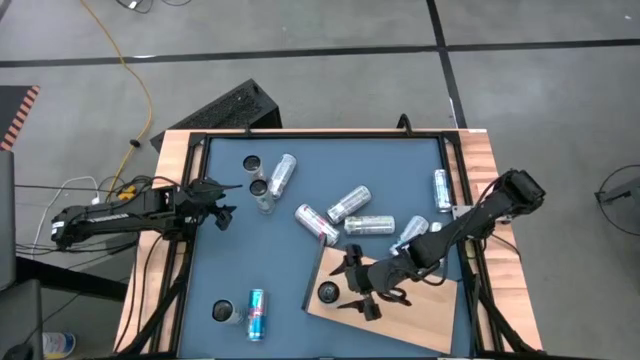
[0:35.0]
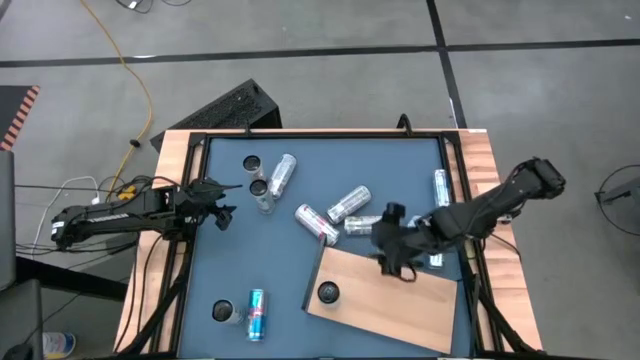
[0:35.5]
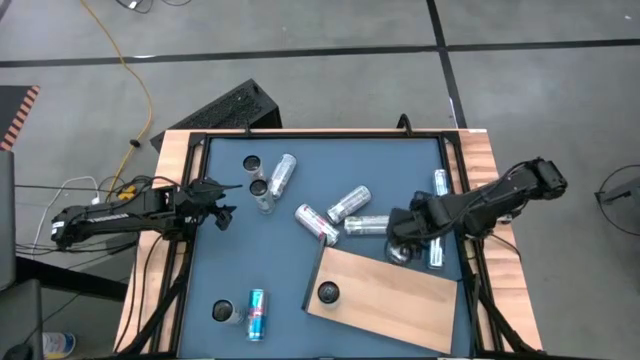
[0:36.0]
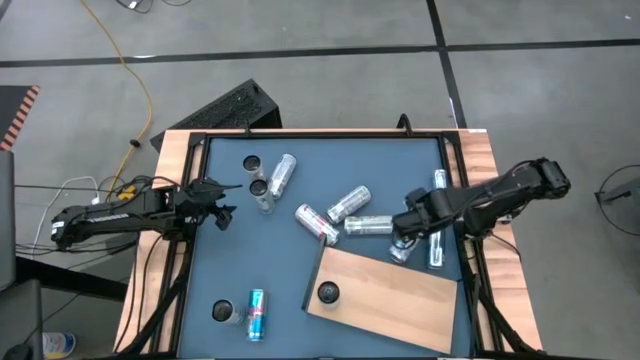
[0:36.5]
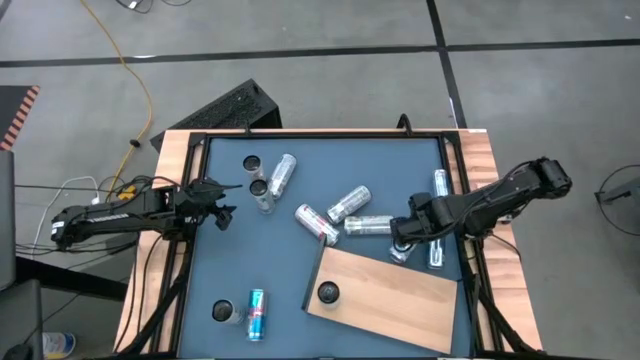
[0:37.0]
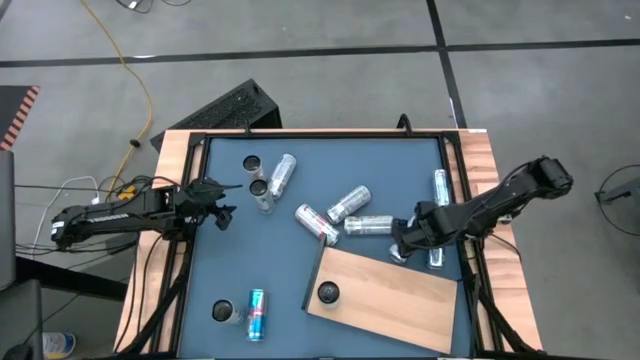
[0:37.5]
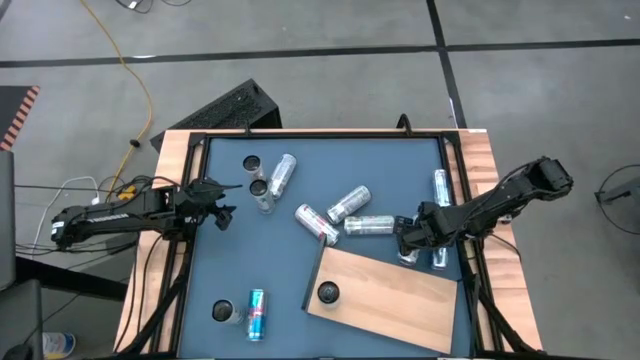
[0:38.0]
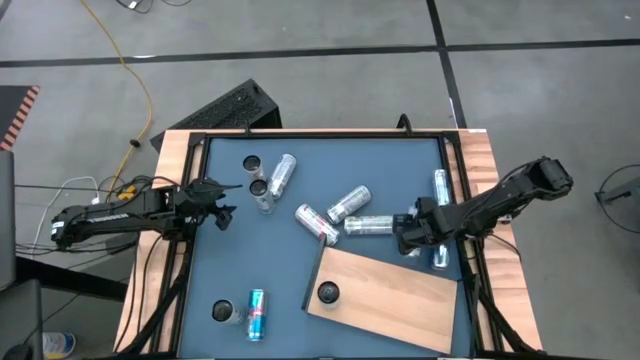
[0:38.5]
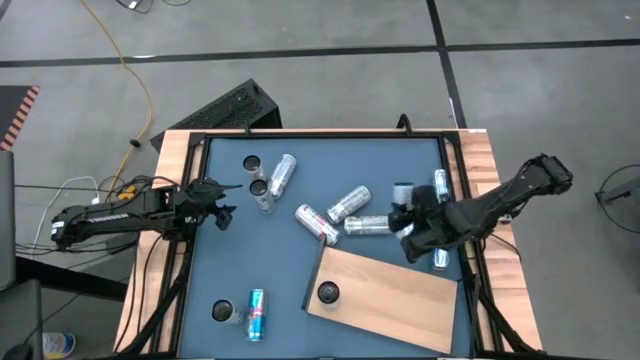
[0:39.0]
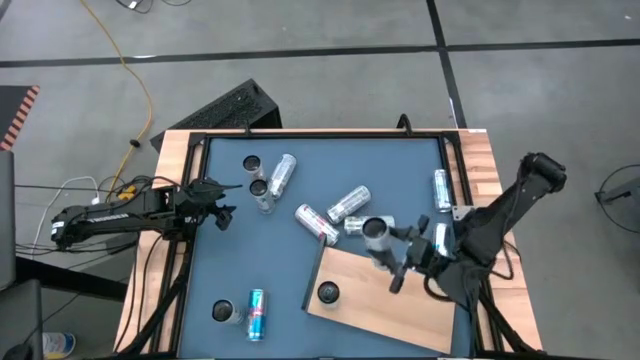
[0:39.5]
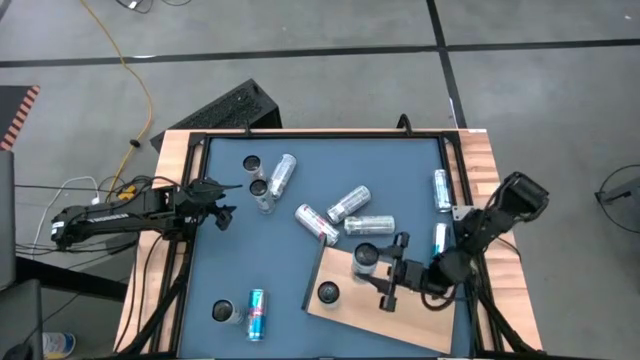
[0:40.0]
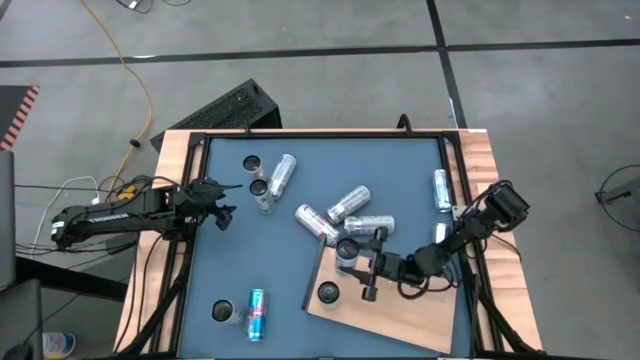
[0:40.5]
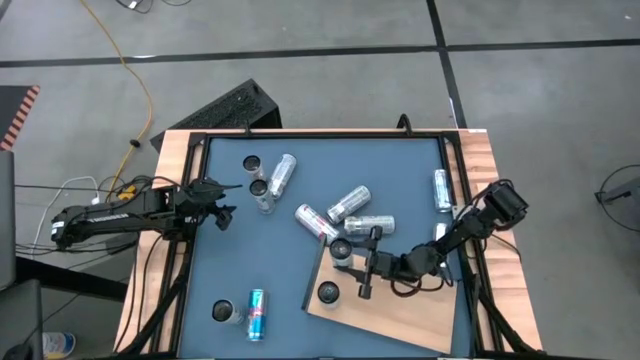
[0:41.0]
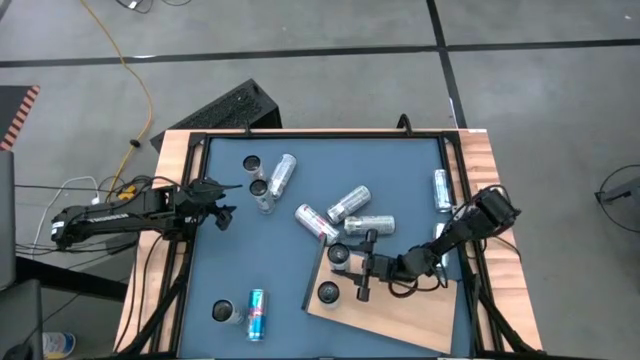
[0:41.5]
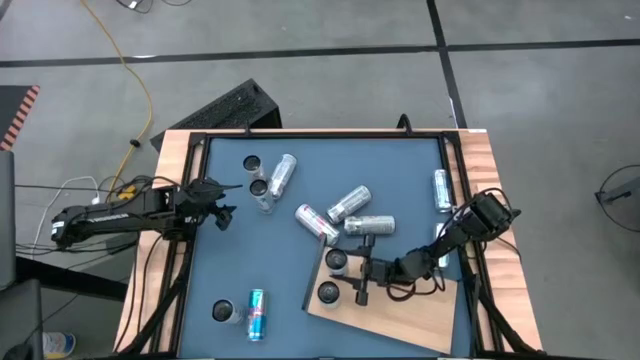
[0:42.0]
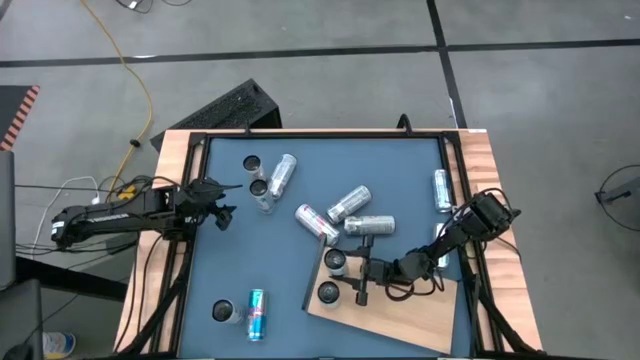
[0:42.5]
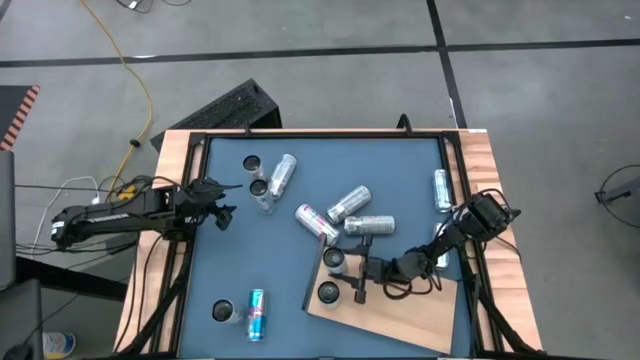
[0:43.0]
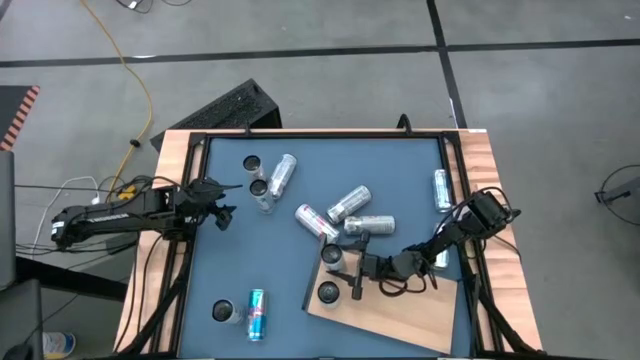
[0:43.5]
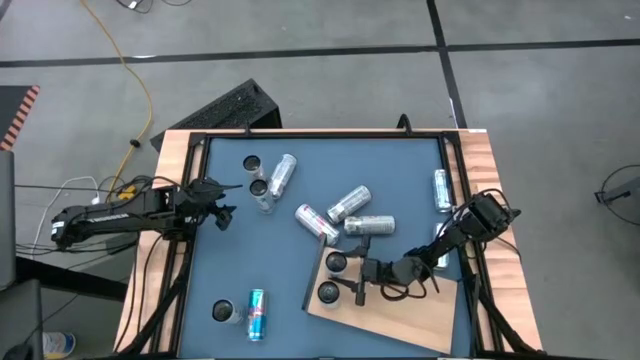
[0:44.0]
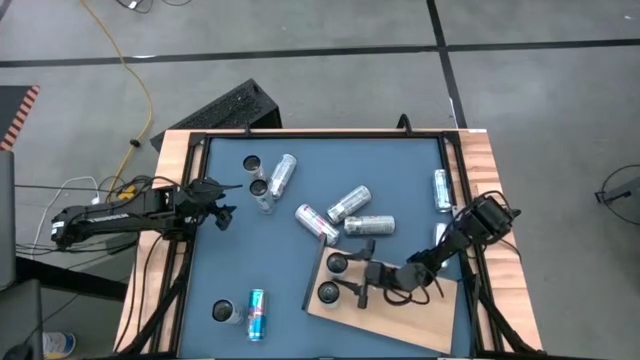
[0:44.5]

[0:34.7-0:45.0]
Task: Place canned beverage on shelf
Put the right white blue soda can on the shelf

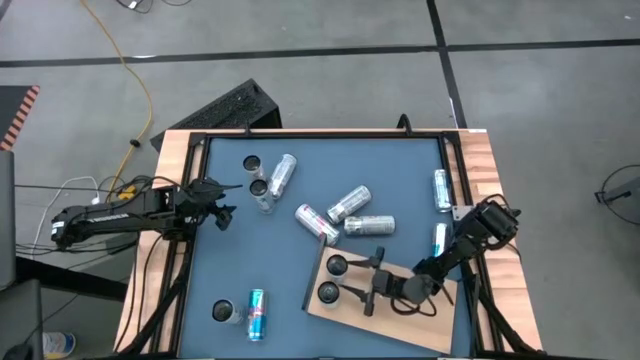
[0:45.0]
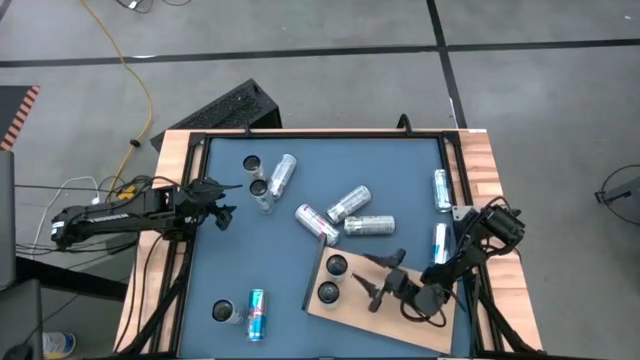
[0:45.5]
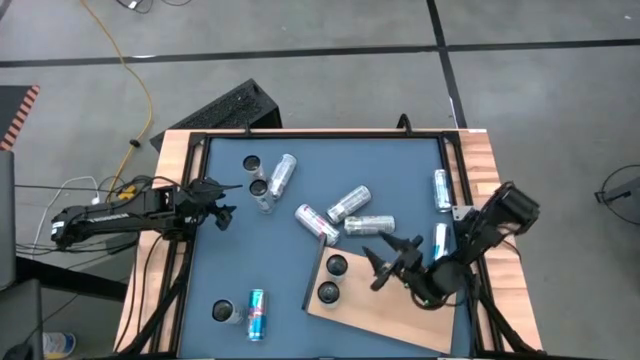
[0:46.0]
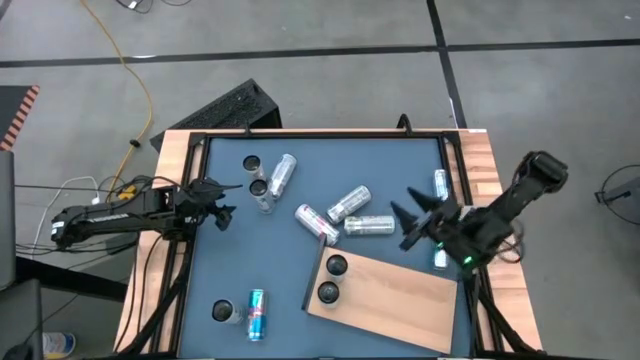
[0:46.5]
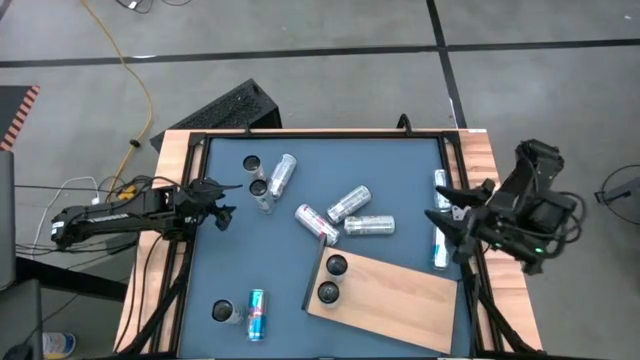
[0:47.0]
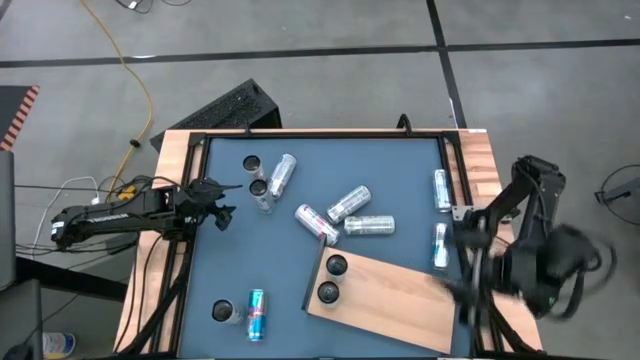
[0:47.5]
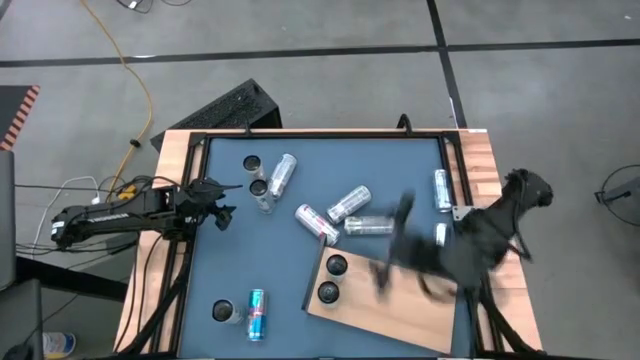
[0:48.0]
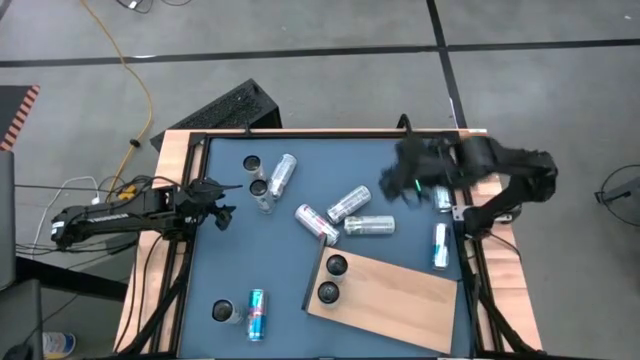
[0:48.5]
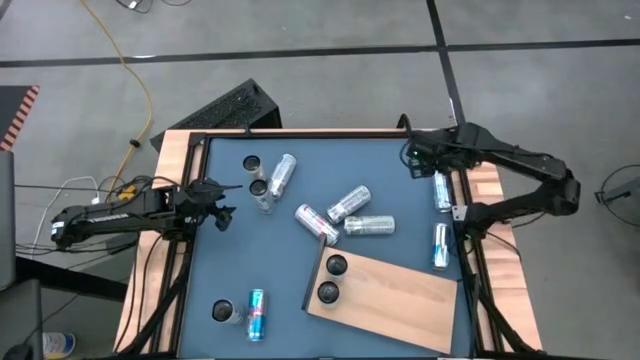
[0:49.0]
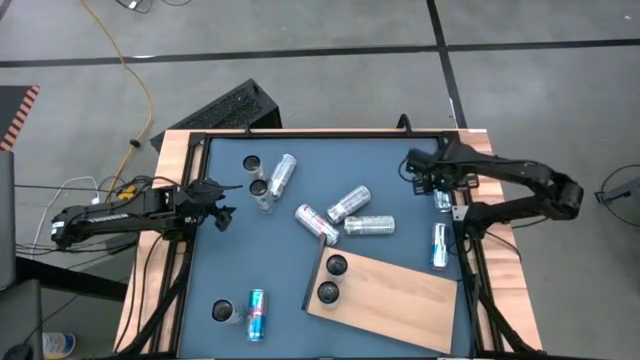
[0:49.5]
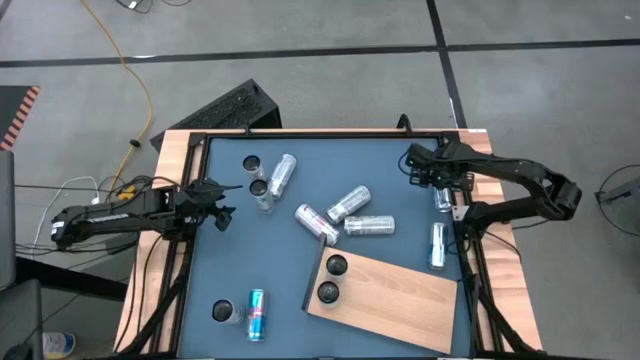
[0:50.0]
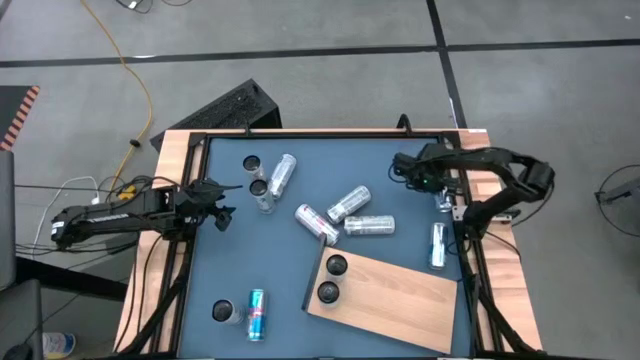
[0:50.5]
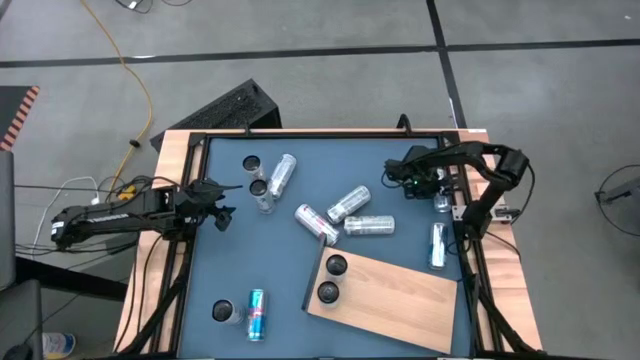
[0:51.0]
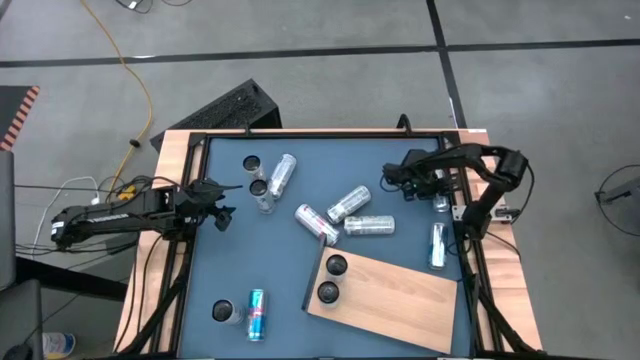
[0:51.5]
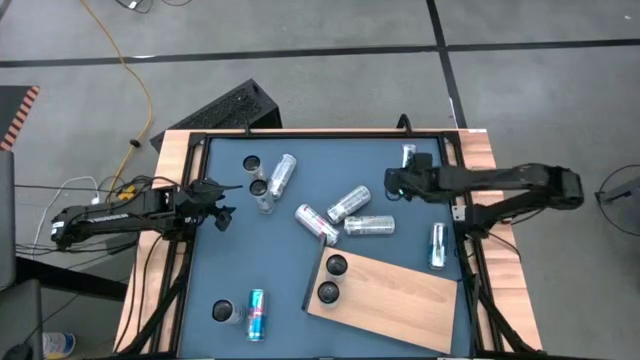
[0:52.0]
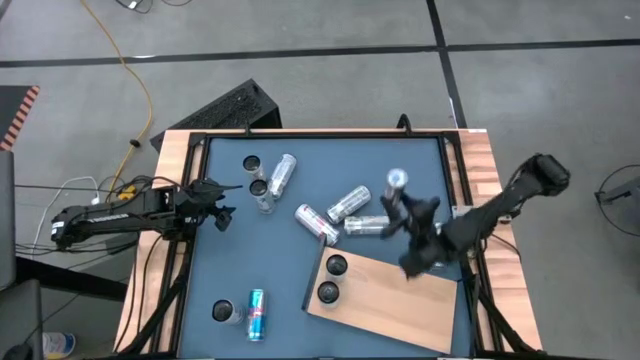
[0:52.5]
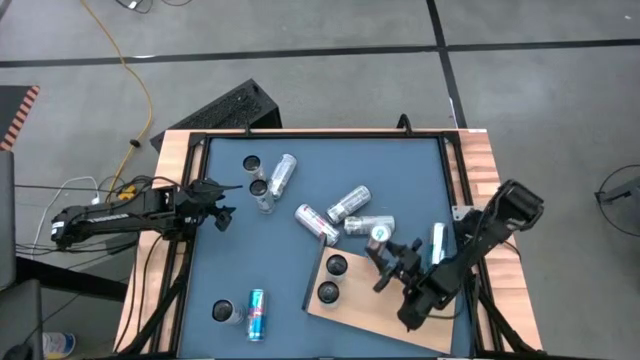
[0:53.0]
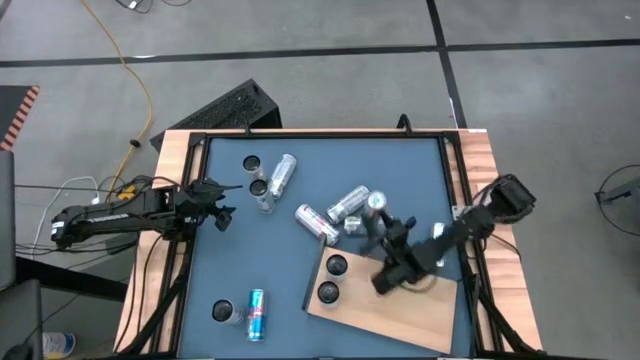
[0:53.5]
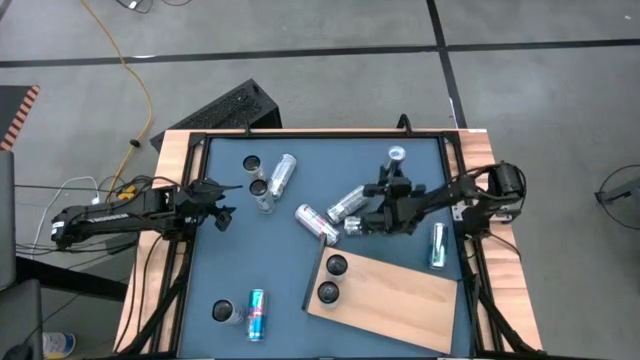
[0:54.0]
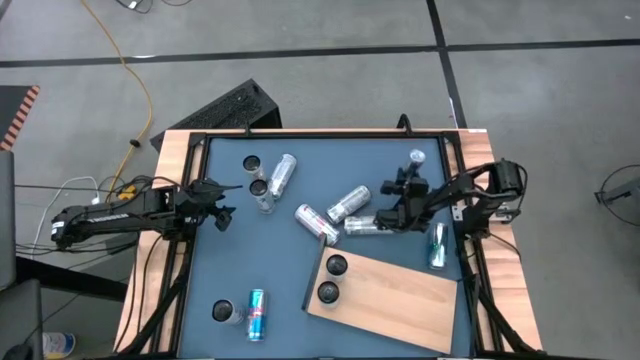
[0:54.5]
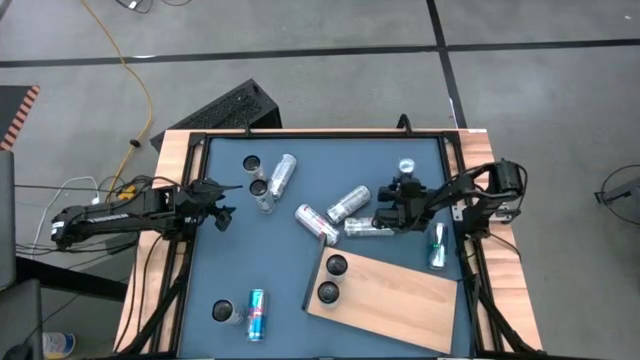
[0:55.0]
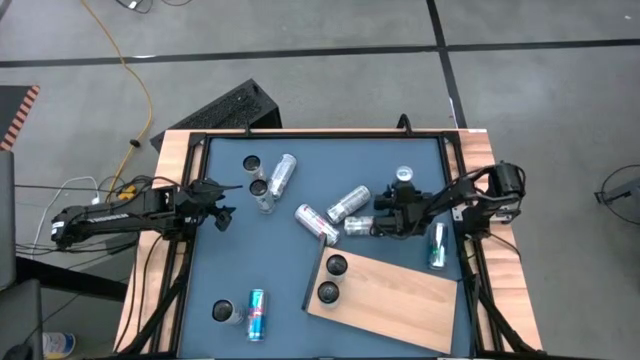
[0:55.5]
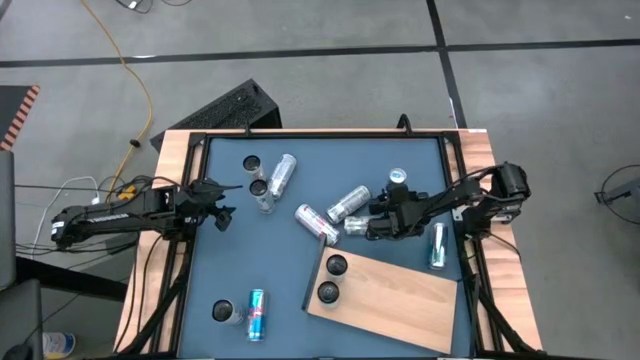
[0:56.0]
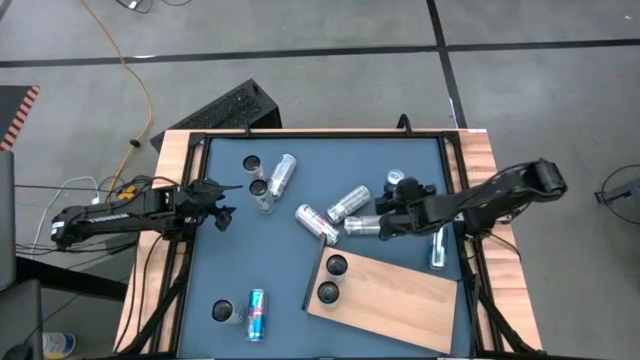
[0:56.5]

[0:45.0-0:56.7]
Adjust the top blue soda can
